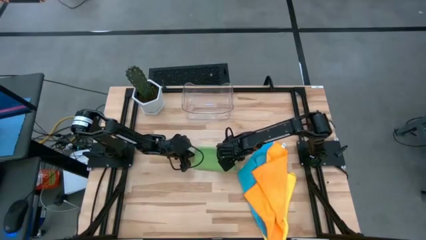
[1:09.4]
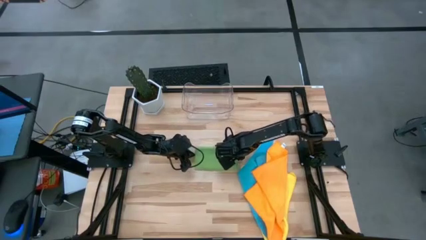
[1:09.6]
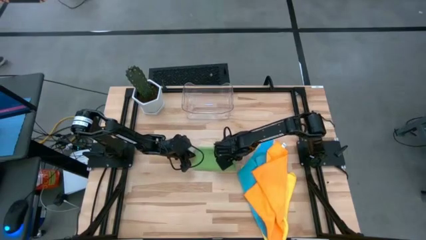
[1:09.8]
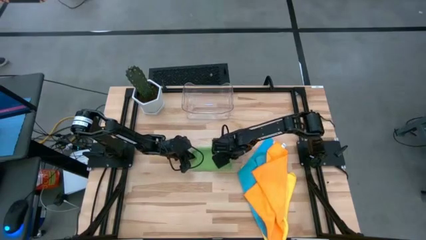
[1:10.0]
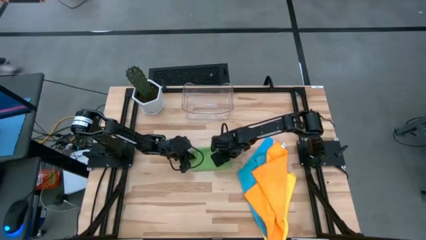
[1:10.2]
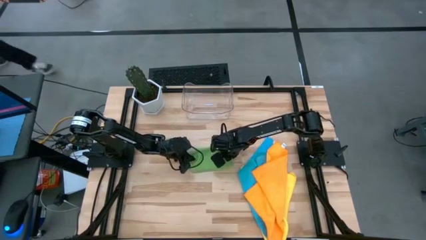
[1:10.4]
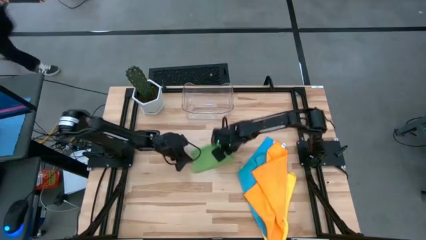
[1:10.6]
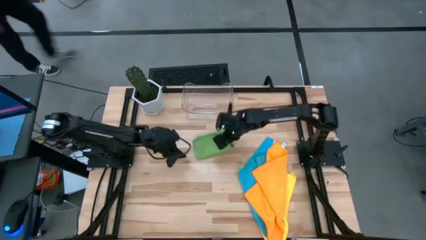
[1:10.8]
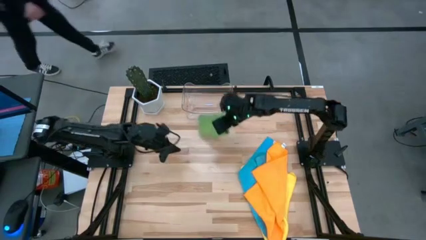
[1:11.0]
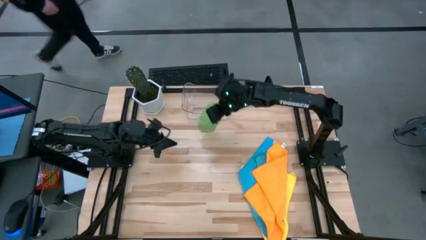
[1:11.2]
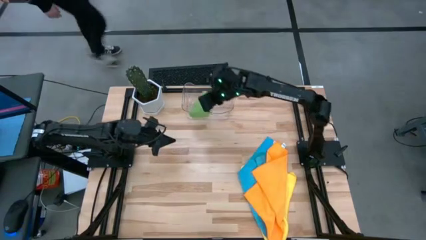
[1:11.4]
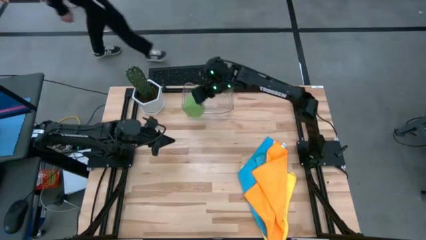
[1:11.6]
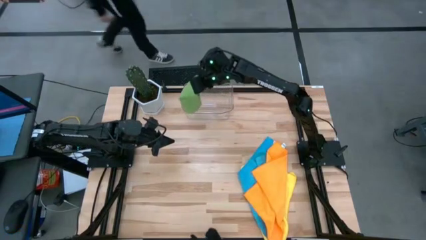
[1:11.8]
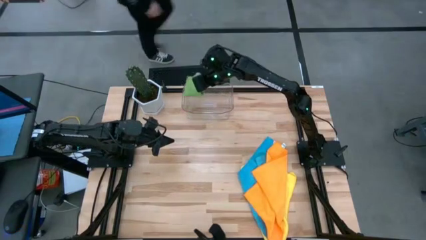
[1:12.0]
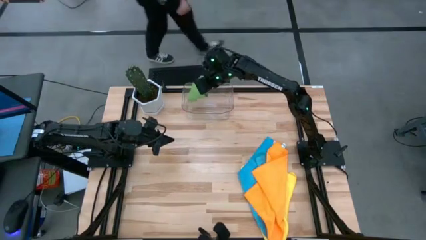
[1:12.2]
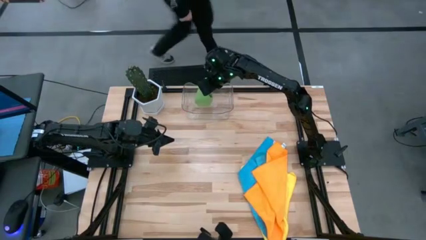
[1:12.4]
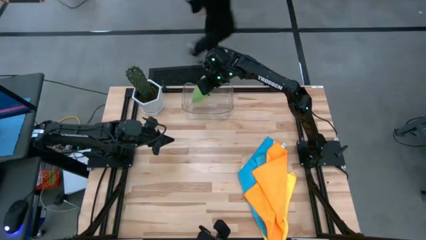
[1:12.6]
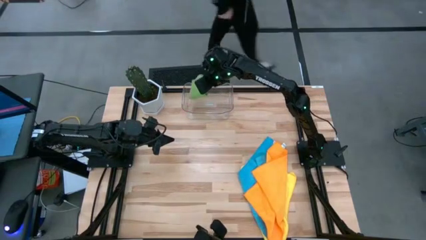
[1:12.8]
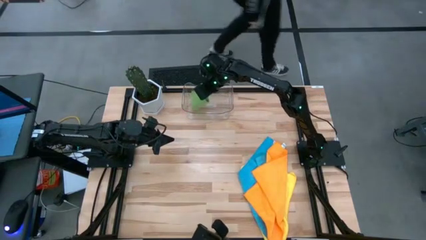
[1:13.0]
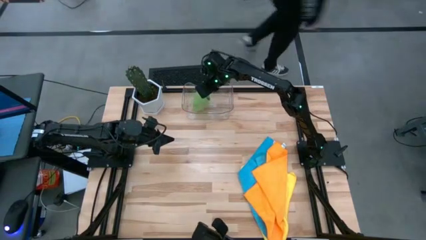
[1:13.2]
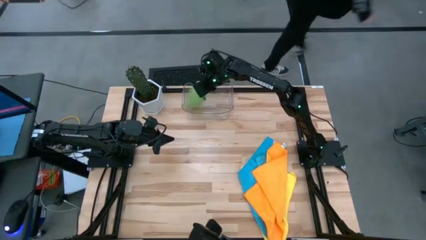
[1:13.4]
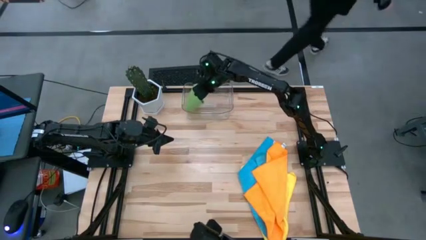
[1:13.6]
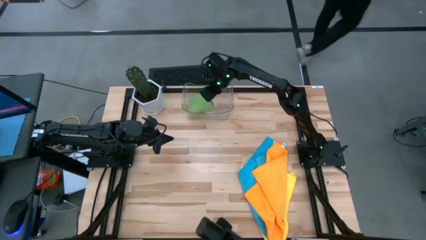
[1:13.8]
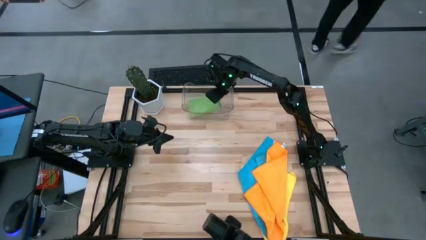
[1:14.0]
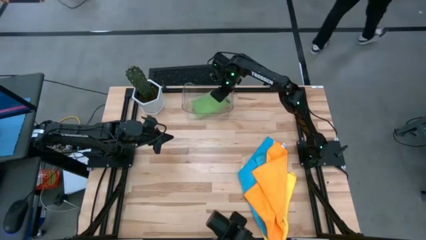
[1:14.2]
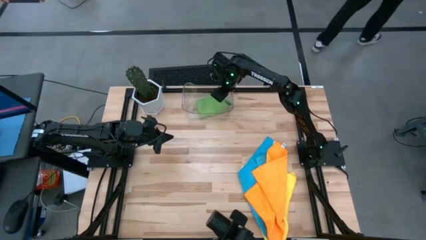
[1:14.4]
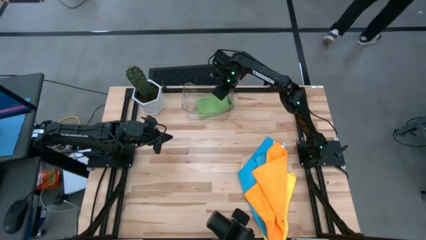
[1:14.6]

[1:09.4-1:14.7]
Task: Fold microfiber towels
Put the green towel into the transparent bin

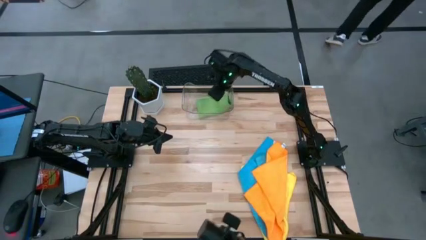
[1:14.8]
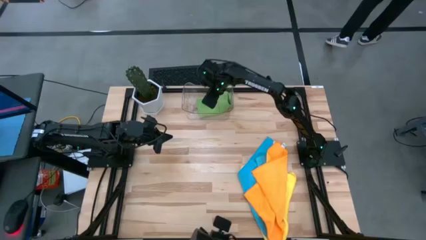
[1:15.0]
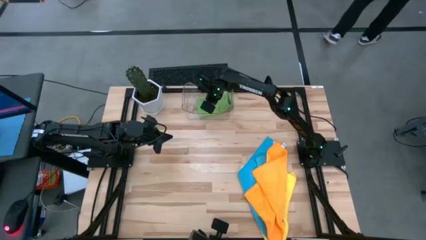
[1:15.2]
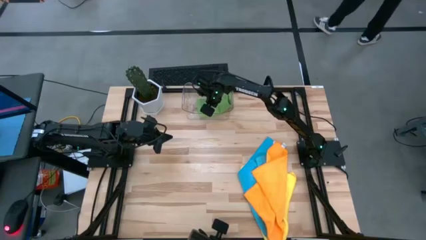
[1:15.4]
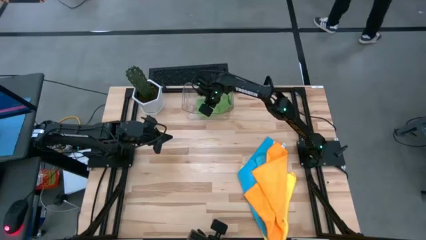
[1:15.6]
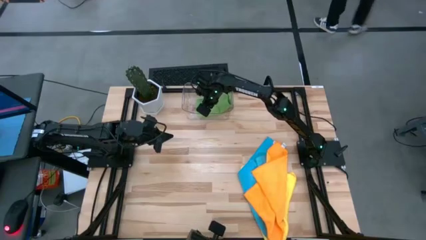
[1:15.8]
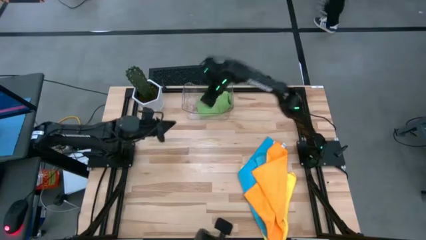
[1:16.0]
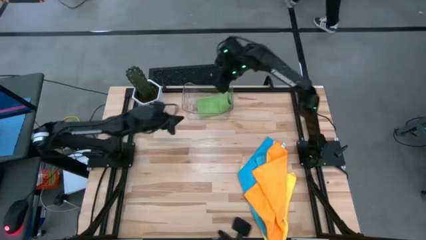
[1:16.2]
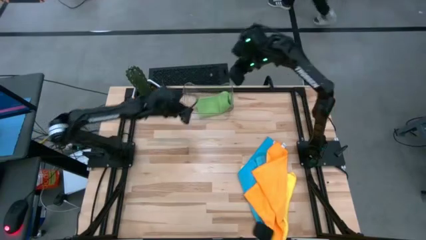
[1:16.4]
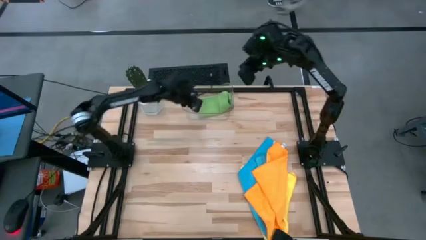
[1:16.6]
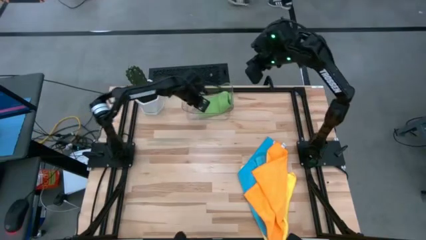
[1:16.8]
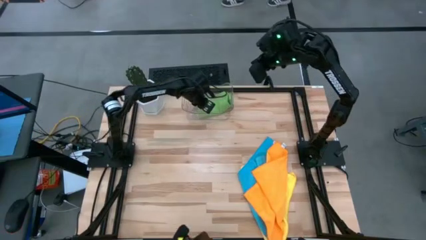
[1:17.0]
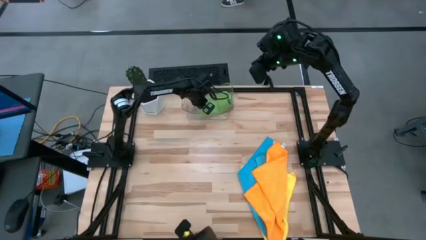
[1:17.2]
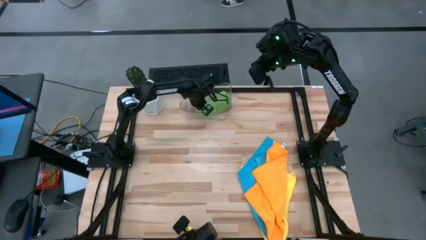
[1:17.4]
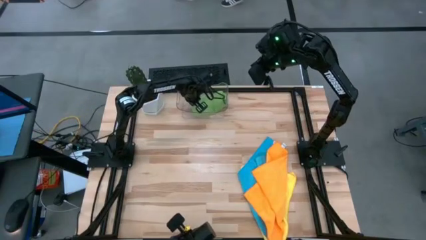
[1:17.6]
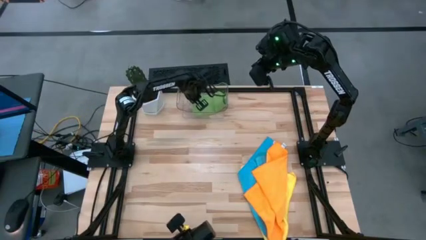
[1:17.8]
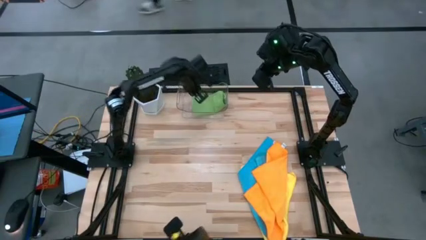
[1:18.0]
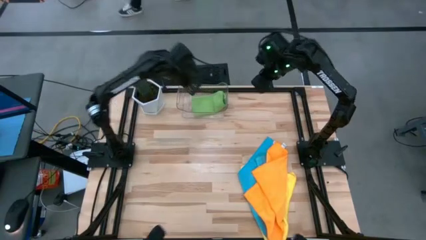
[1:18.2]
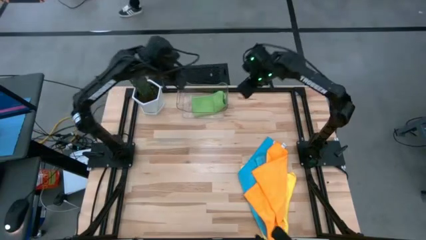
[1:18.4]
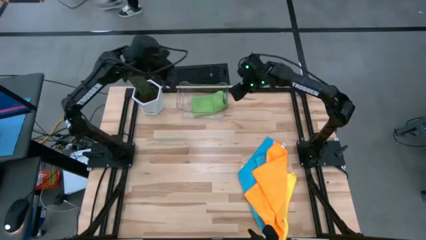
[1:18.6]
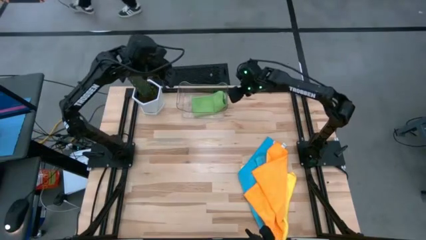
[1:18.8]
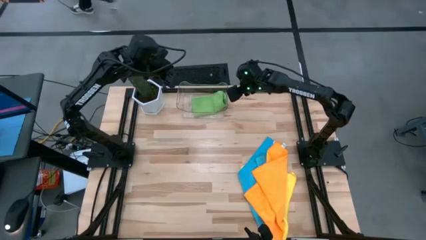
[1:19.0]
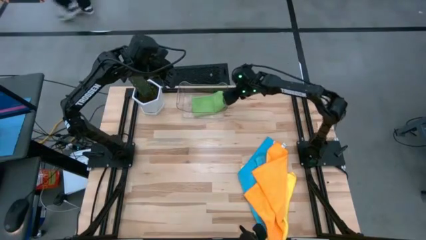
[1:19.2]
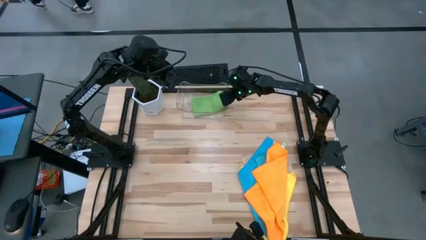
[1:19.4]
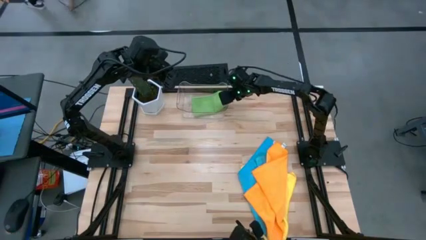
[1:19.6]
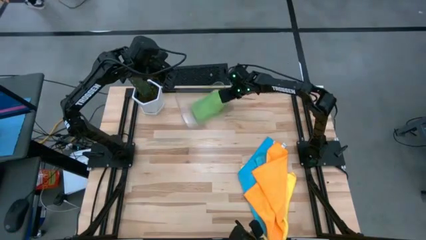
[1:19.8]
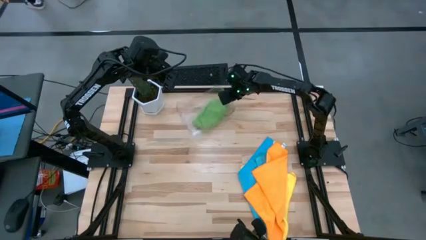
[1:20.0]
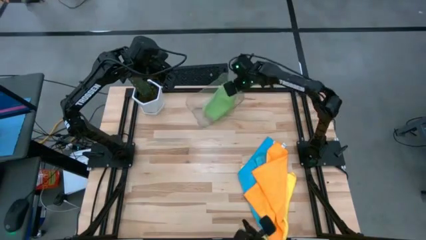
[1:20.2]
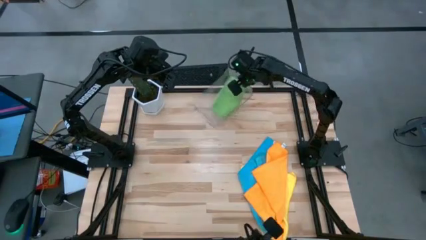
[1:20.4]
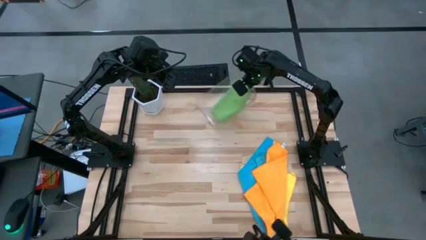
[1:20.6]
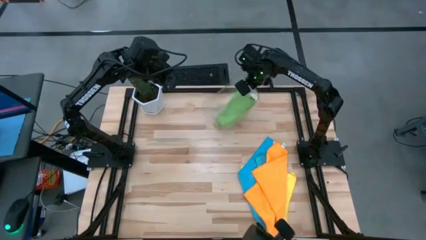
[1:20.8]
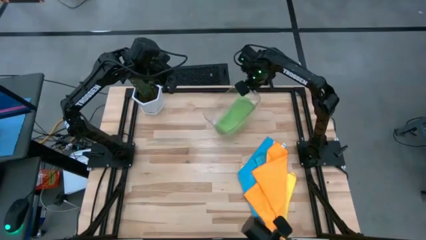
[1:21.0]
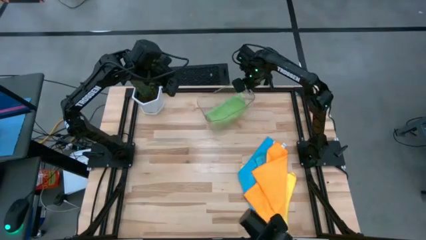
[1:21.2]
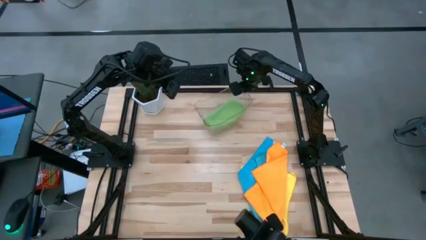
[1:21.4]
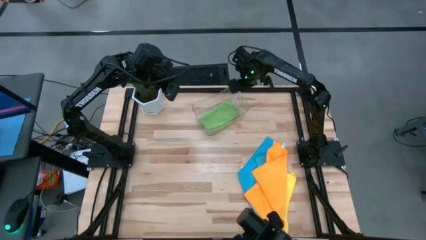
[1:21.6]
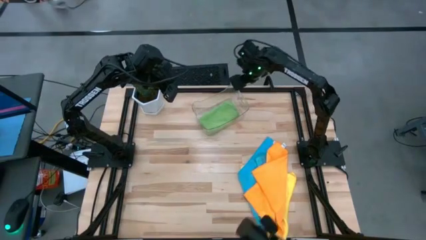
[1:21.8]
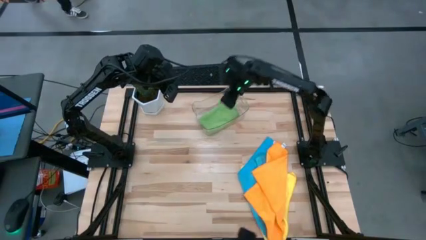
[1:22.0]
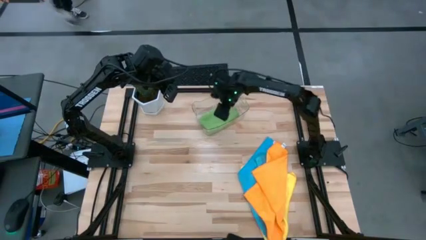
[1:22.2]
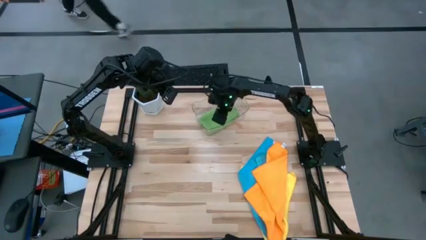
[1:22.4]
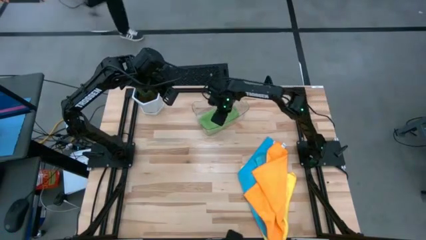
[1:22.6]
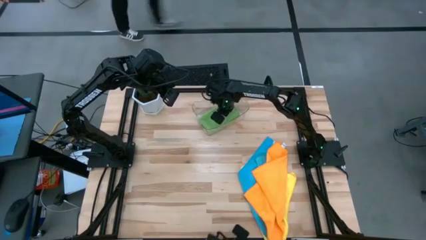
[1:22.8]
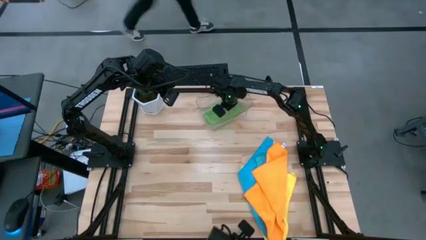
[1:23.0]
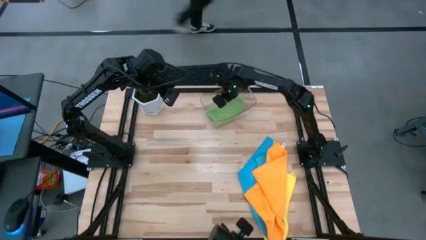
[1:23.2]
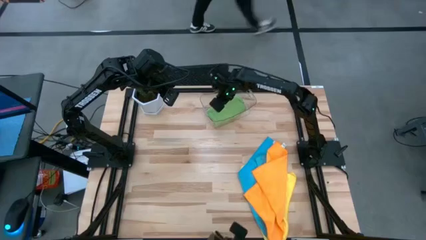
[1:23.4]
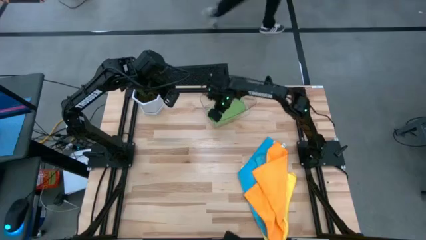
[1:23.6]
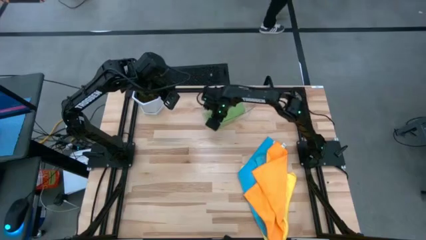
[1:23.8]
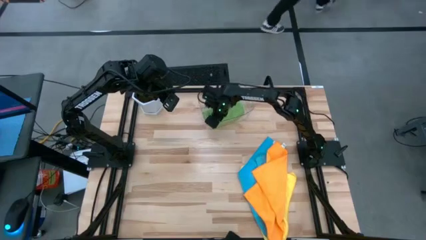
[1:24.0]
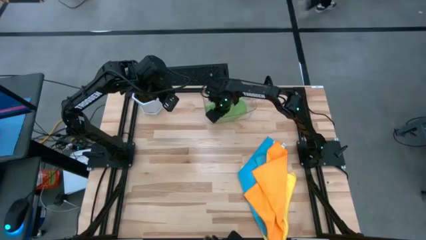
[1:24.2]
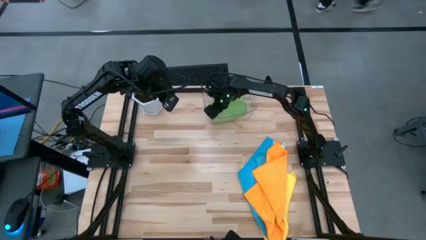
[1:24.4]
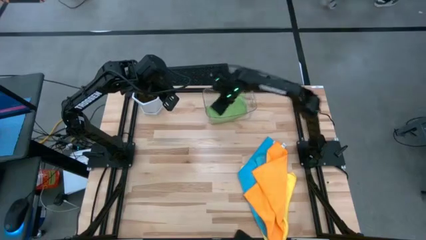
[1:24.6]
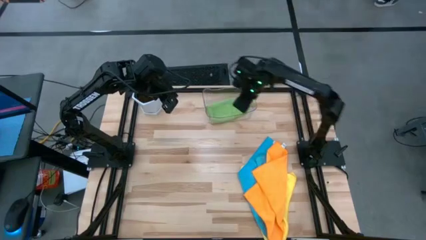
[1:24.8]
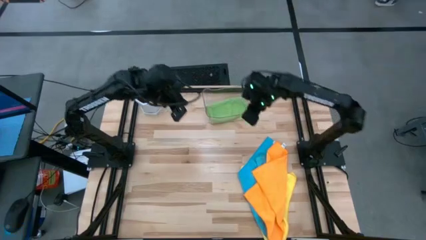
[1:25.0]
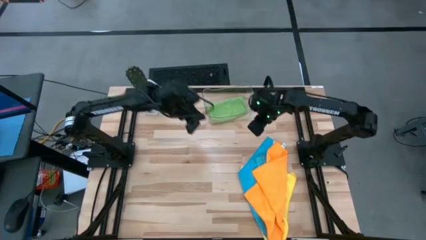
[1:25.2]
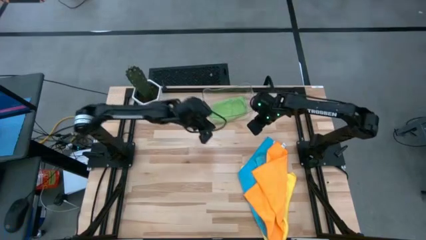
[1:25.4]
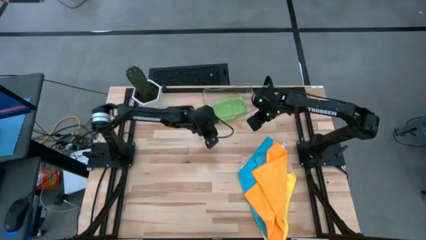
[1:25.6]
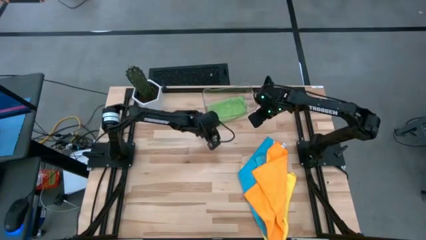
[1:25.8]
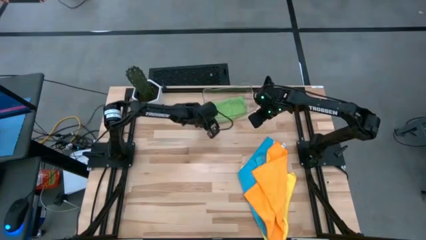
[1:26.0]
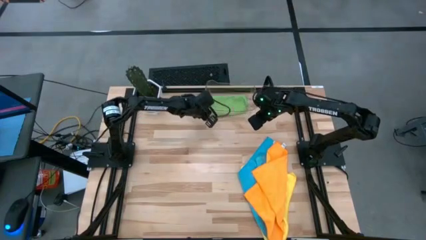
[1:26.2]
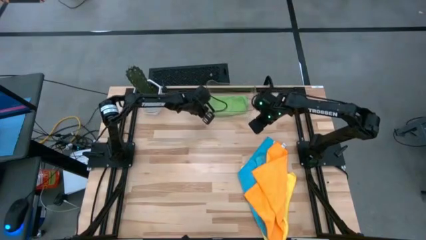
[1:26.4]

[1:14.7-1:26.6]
Adjust the transparent bin
